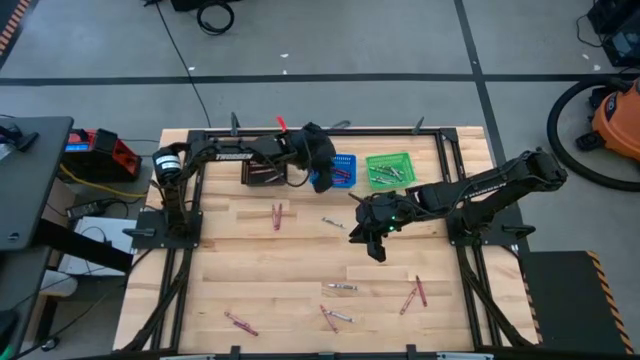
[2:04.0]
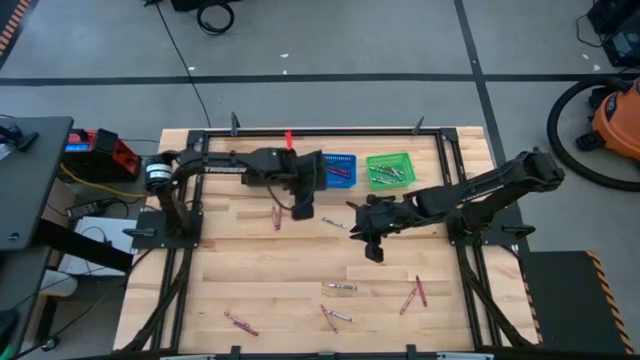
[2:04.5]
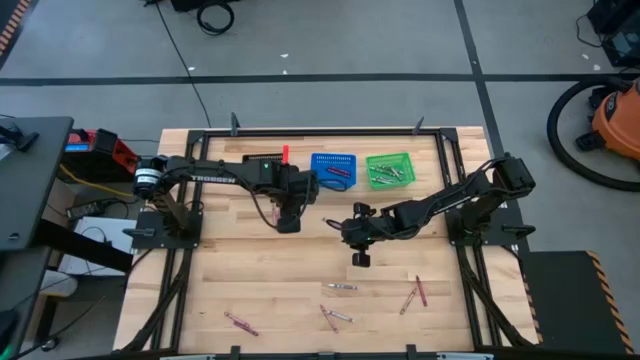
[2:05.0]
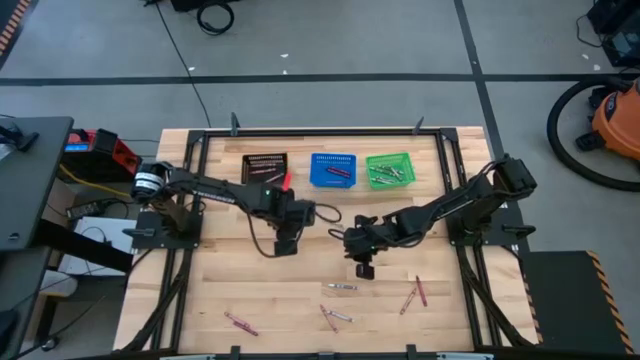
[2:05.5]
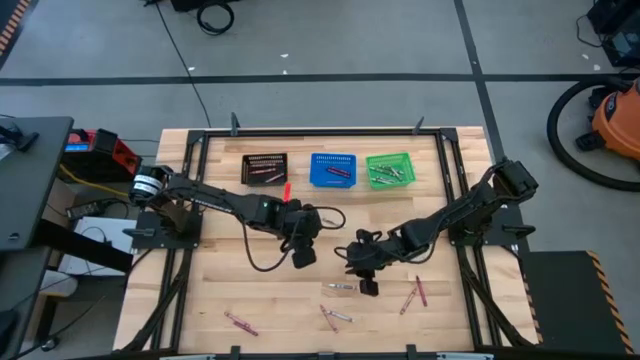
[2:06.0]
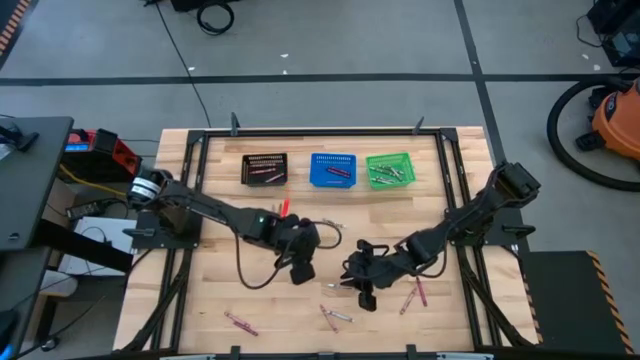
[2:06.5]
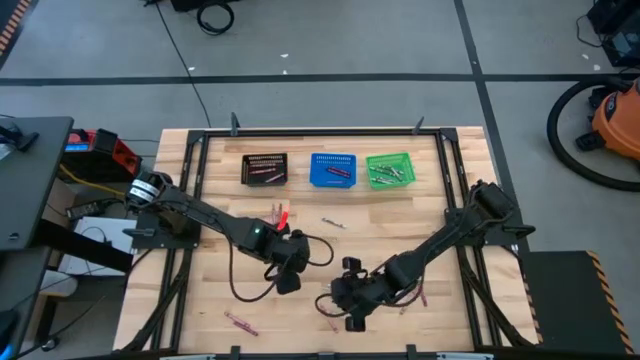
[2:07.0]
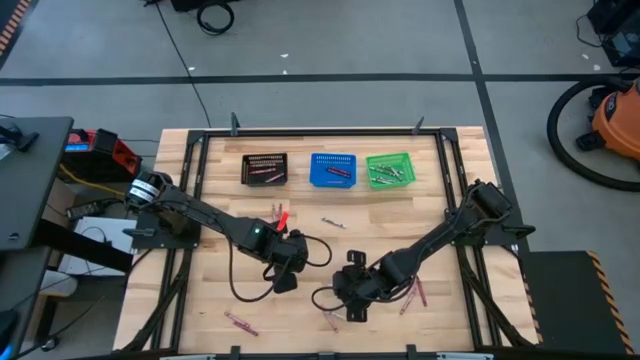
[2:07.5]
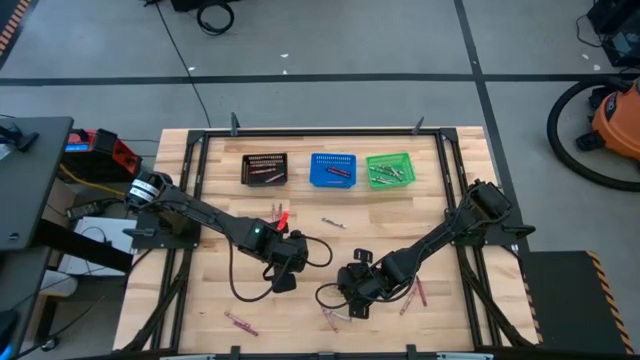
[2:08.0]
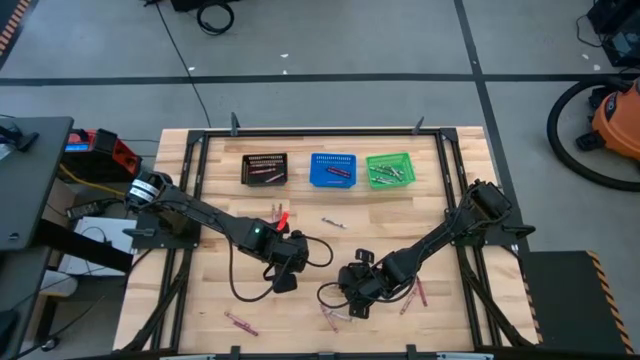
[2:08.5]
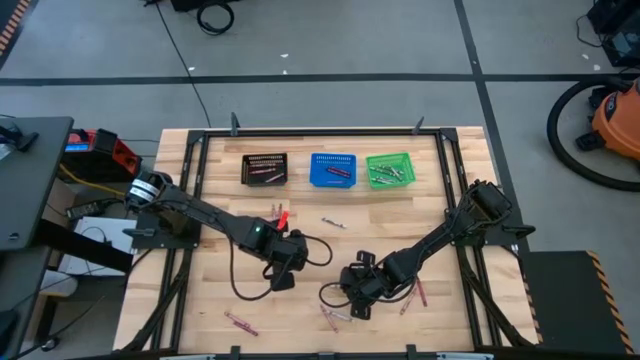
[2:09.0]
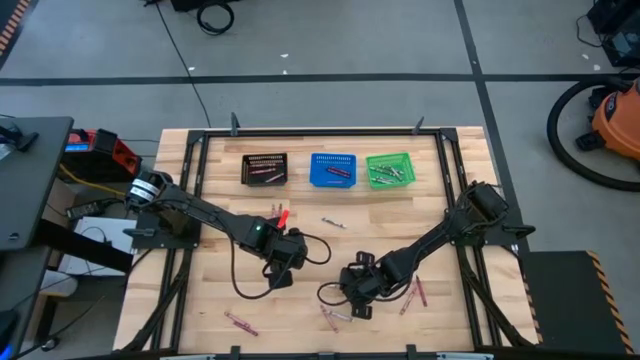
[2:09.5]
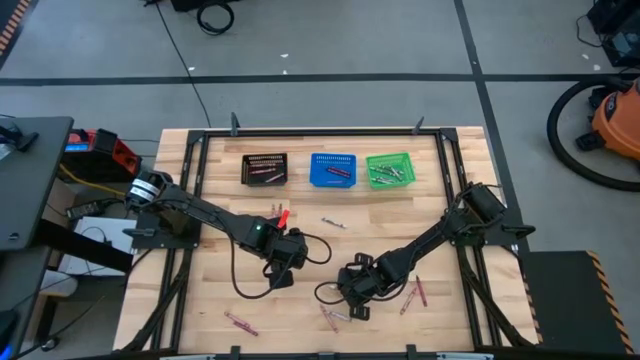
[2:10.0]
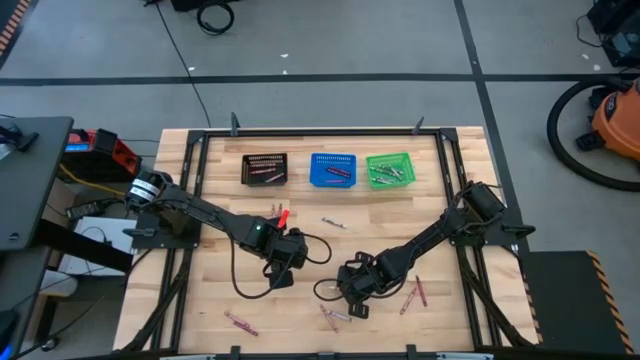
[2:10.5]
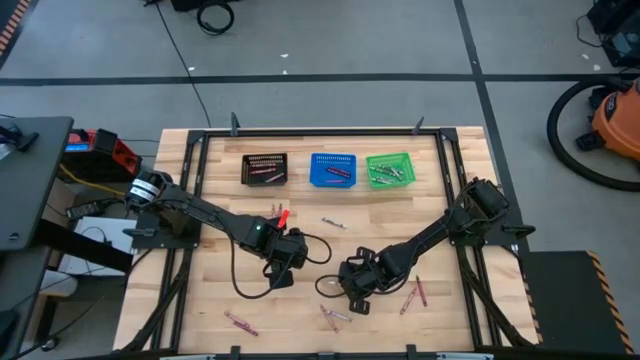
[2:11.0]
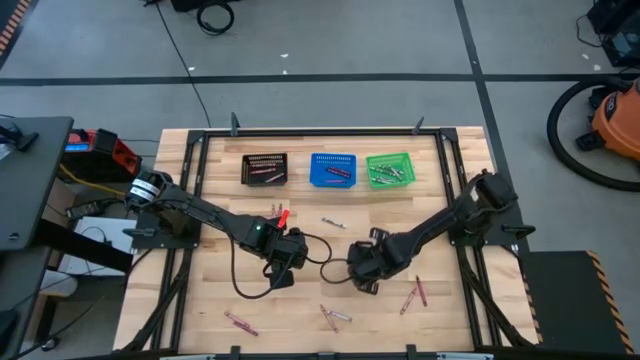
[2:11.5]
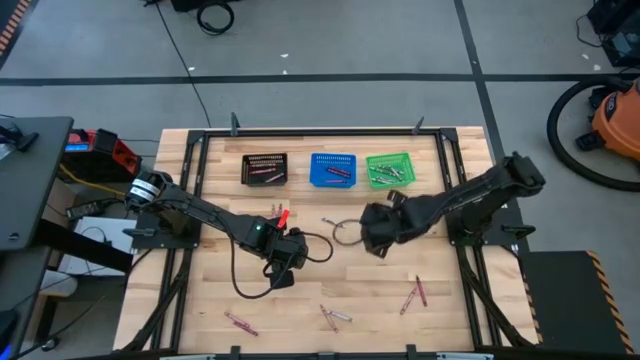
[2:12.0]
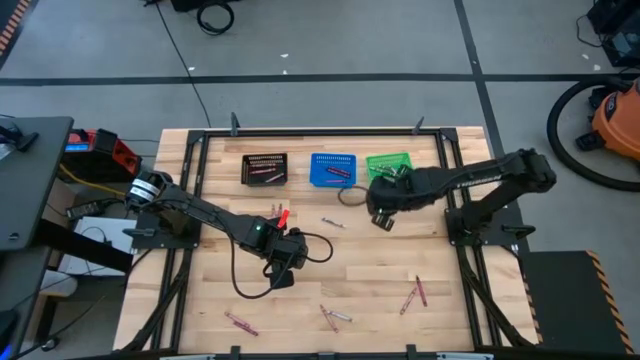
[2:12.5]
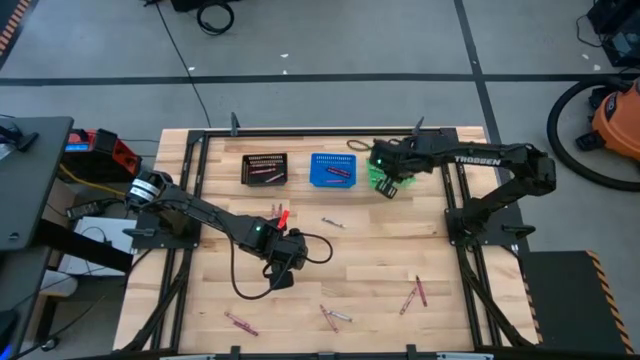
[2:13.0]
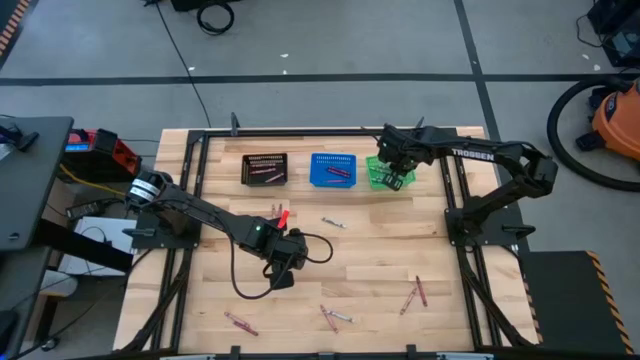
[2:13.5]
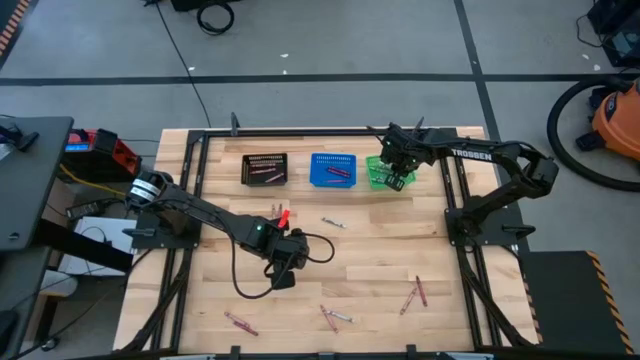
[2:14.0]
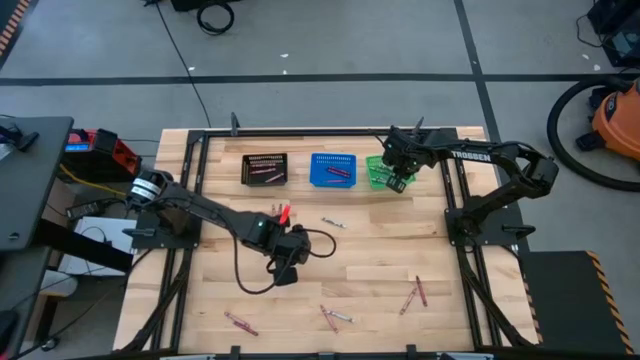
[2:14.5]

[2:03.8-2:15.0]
Task: Sort crayons
Put the white crayon into the green bin

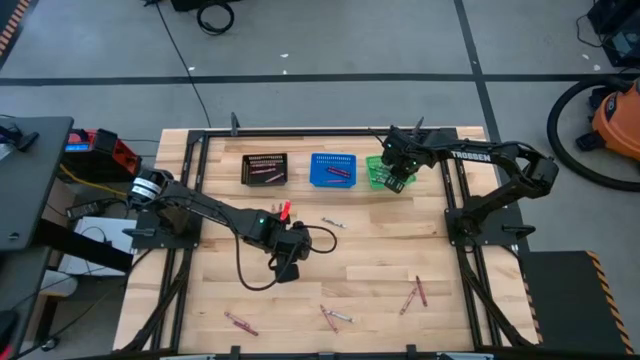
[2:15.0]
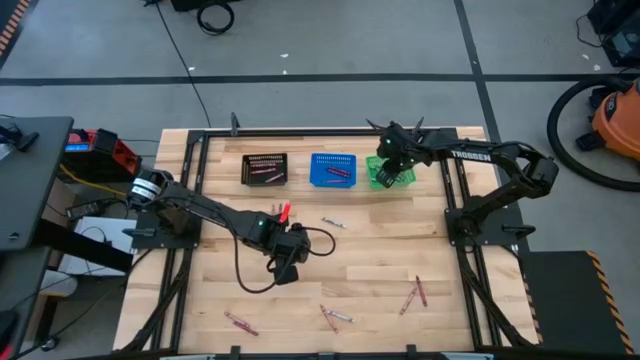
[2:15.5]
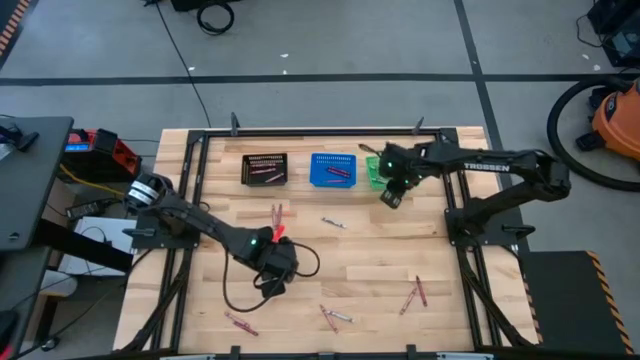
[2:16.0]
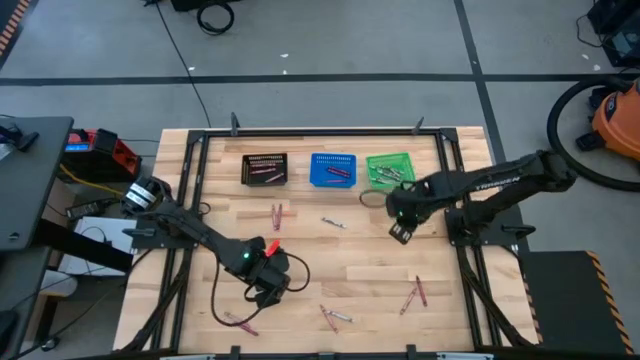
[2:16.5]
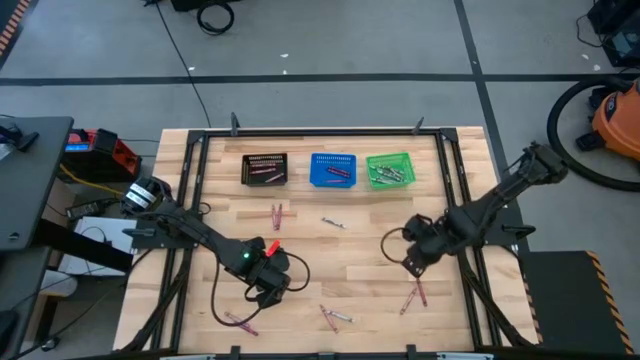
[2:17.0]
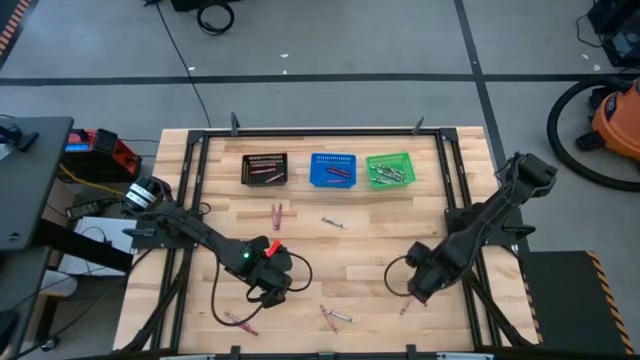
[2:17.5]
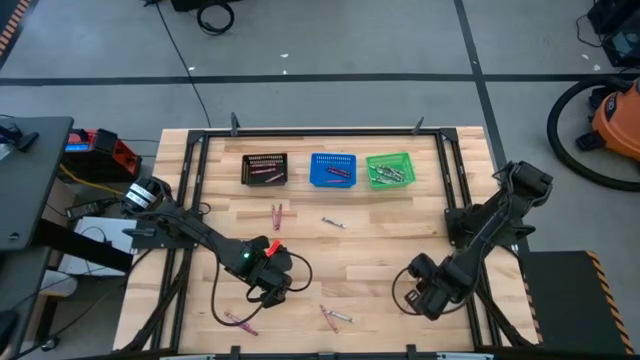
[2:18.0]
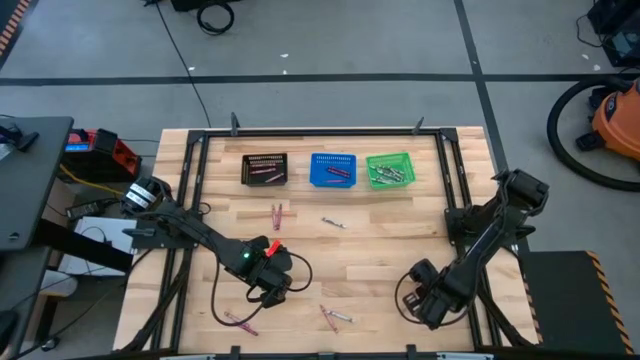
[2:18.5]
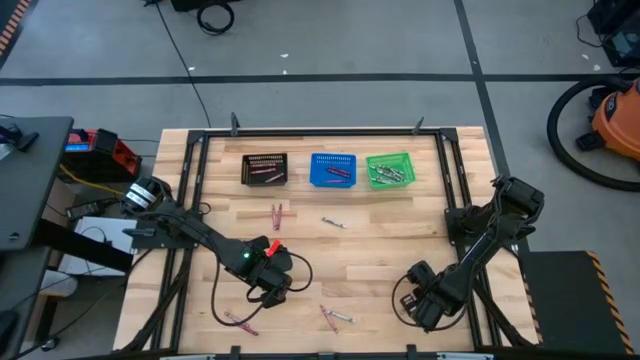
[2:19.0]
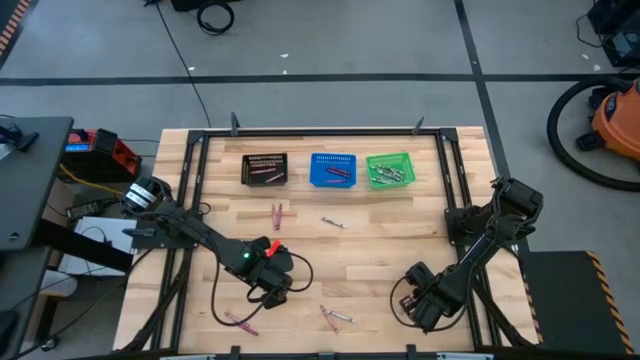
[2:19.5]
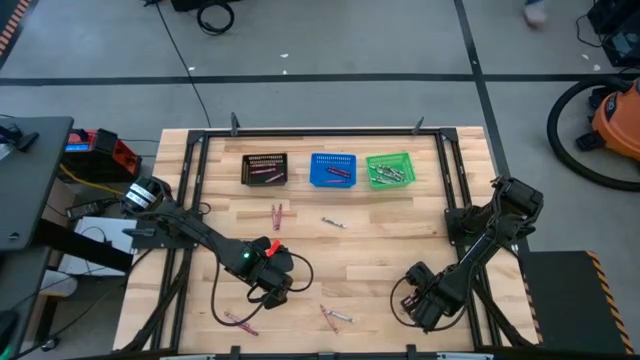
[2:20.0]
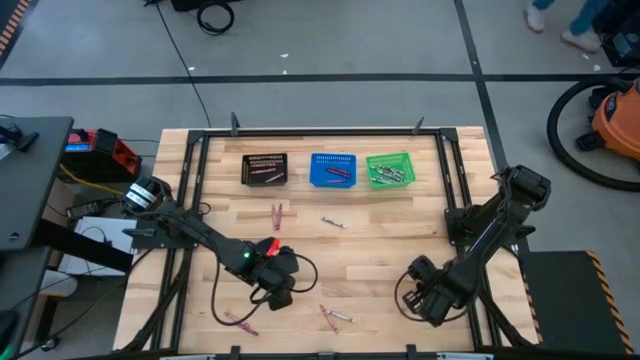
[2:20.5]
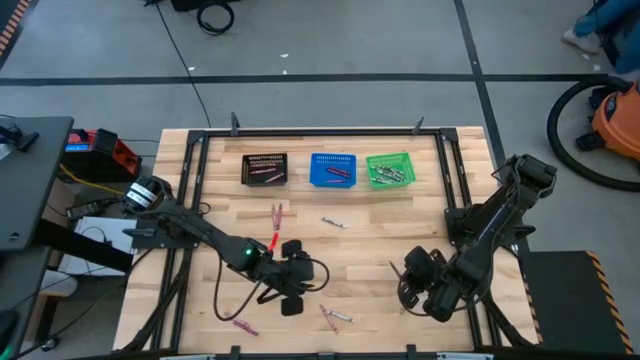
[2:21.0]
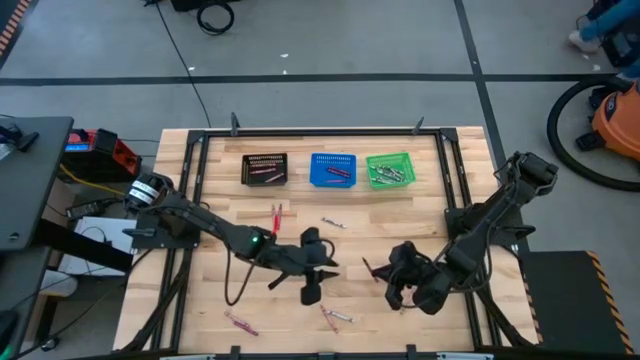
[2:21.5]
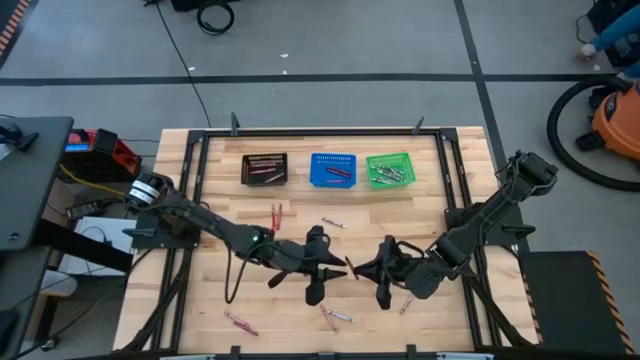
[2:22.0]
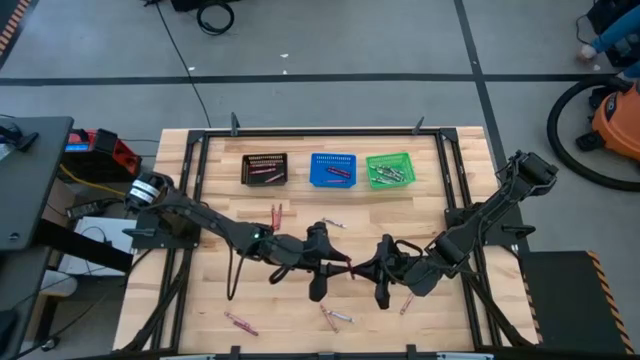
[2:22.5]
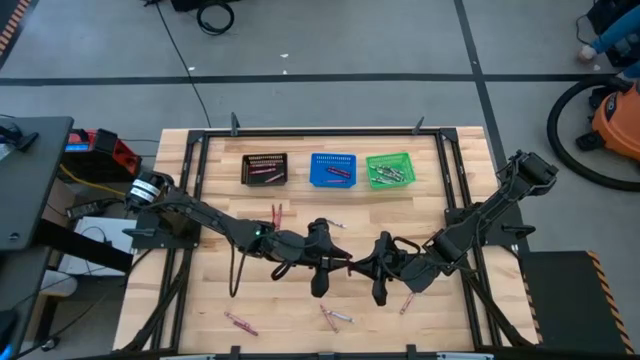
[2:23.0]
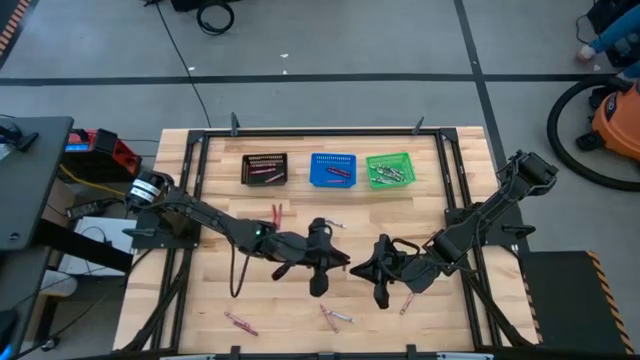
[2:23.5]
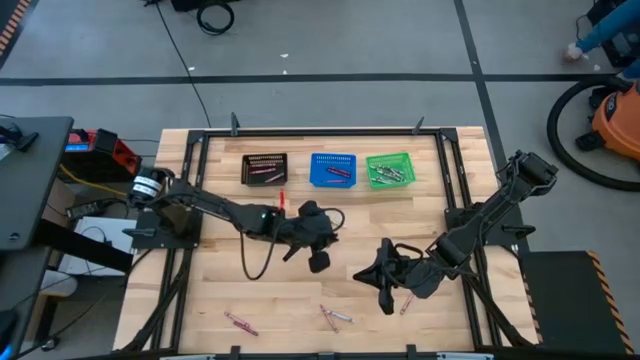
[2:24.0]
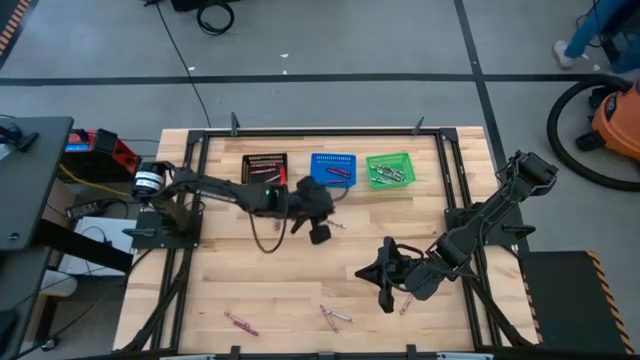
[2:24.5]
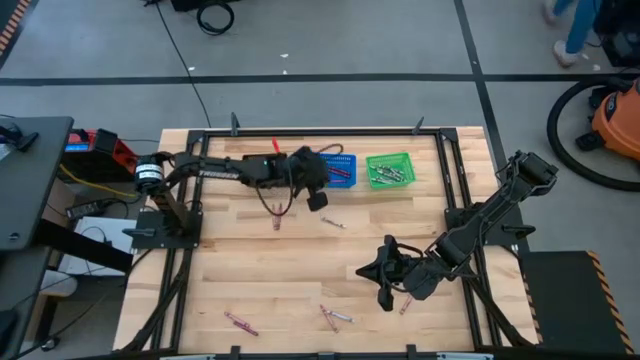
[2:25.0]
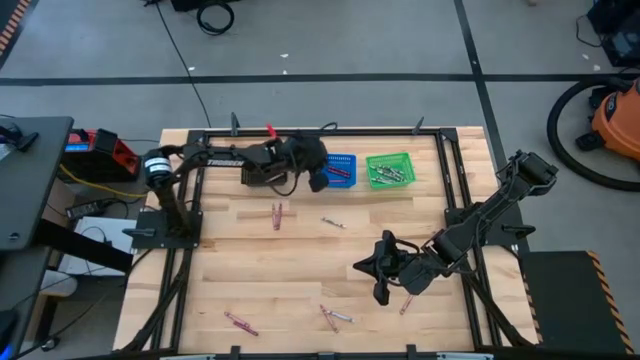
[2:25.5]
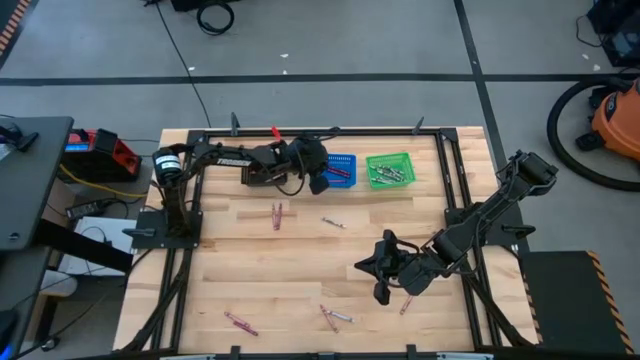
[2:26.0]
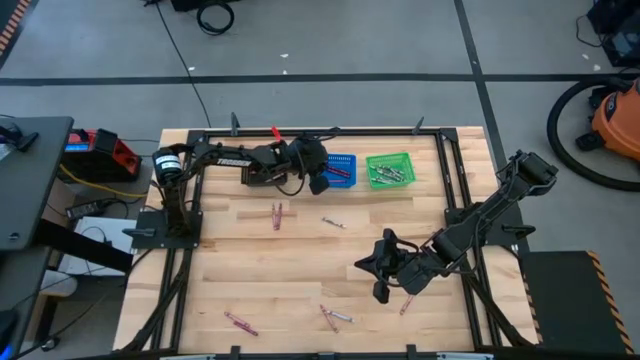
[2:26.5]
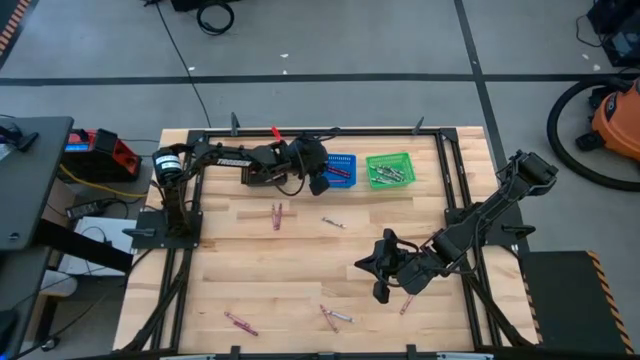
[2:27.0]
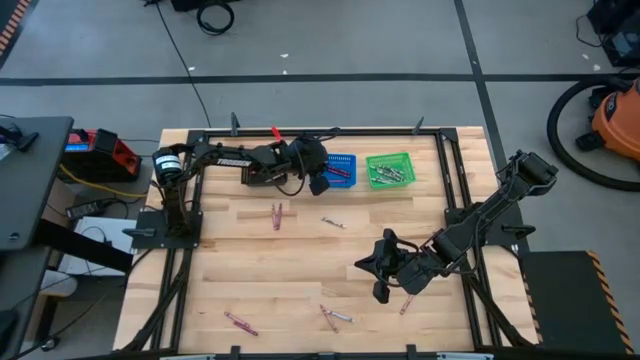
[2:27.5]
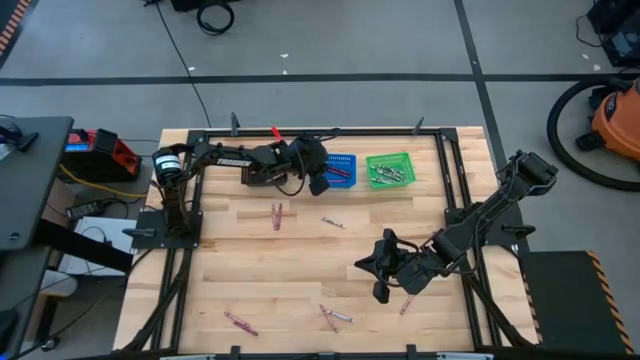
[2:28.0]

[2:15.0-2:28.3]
Put the red crayon into the blue bin
